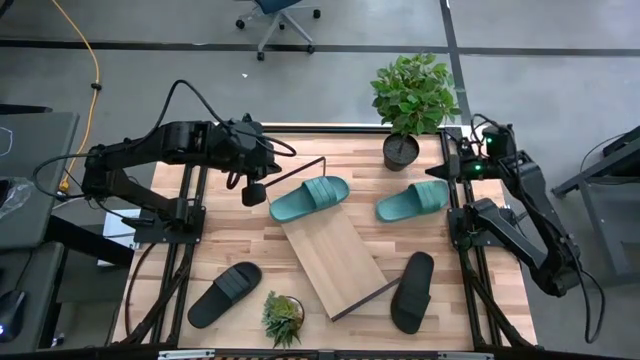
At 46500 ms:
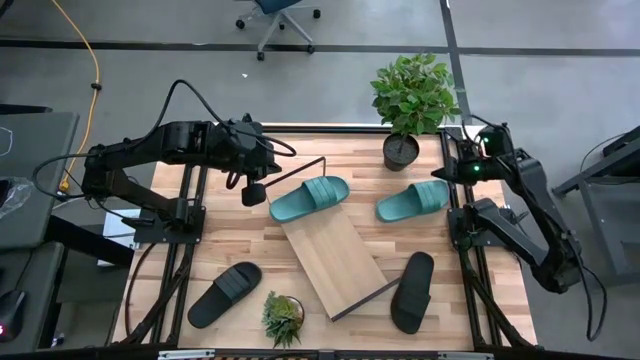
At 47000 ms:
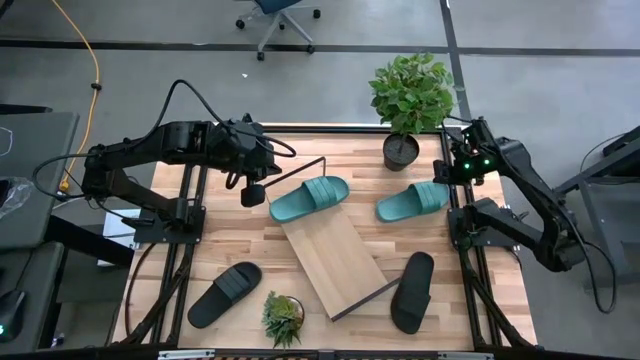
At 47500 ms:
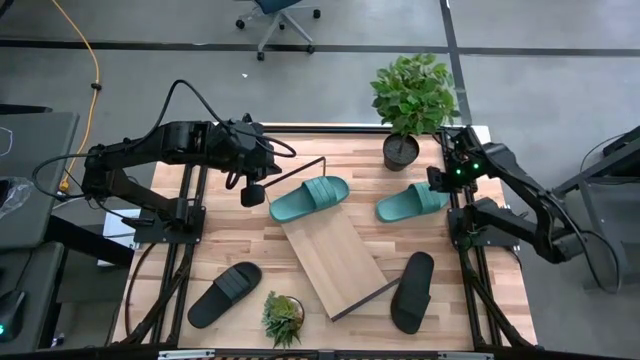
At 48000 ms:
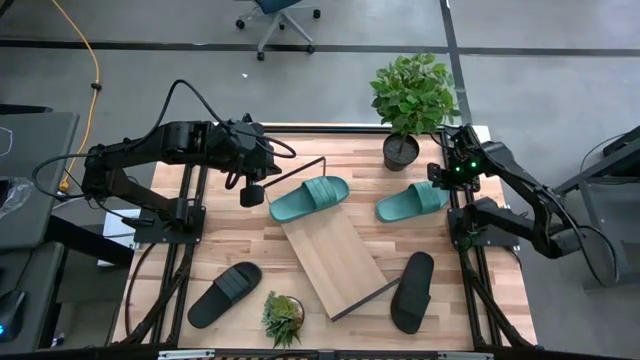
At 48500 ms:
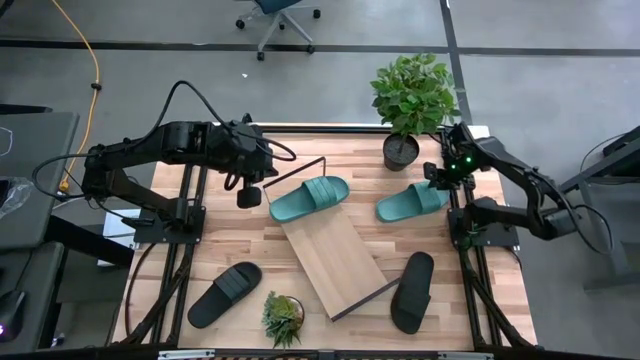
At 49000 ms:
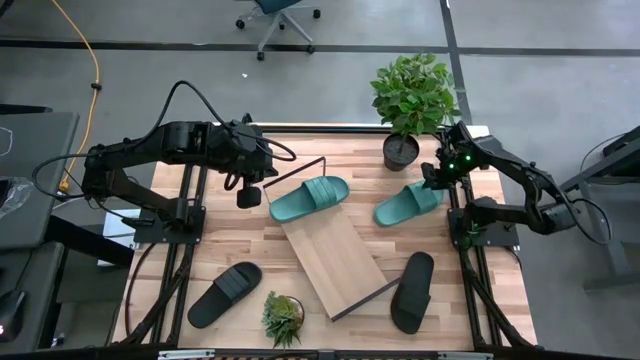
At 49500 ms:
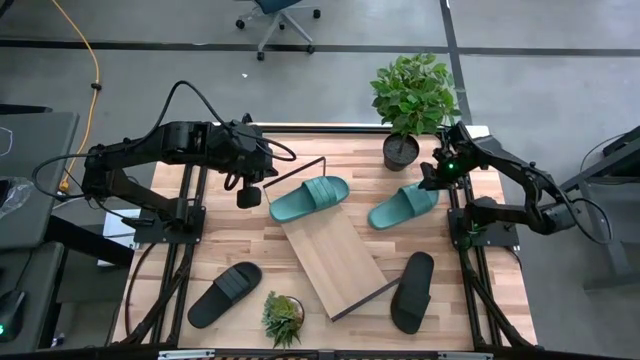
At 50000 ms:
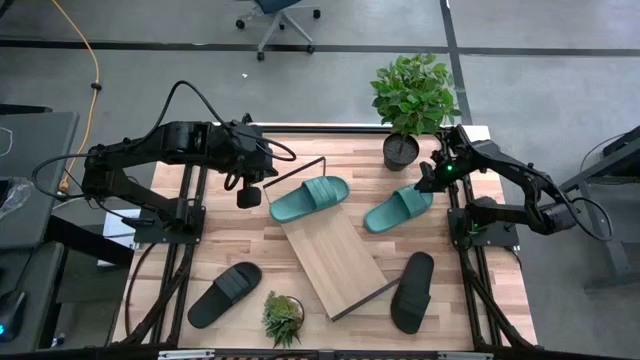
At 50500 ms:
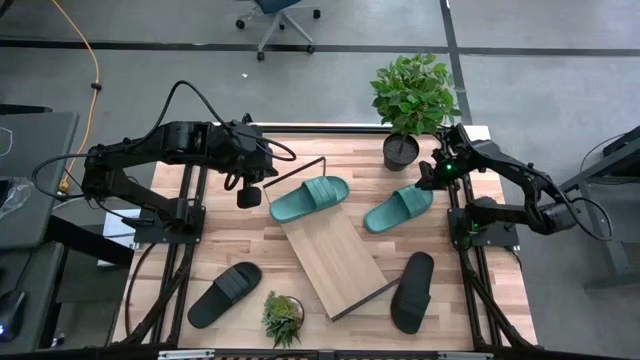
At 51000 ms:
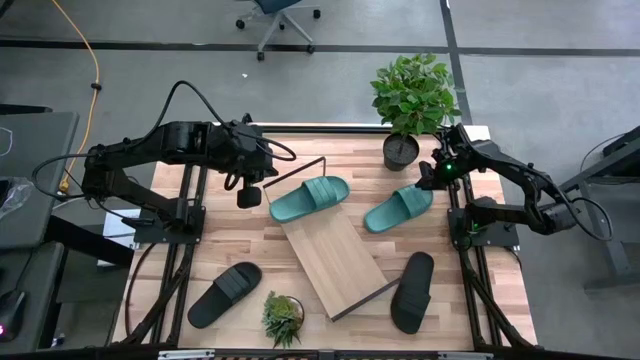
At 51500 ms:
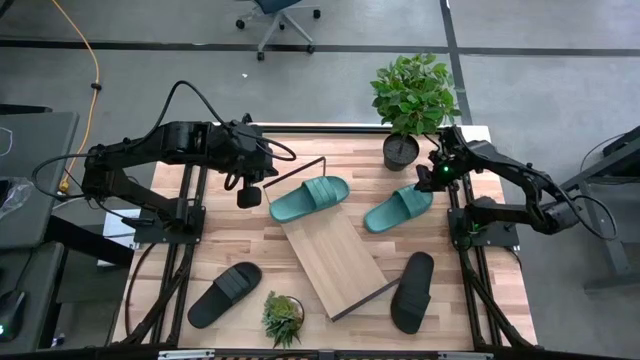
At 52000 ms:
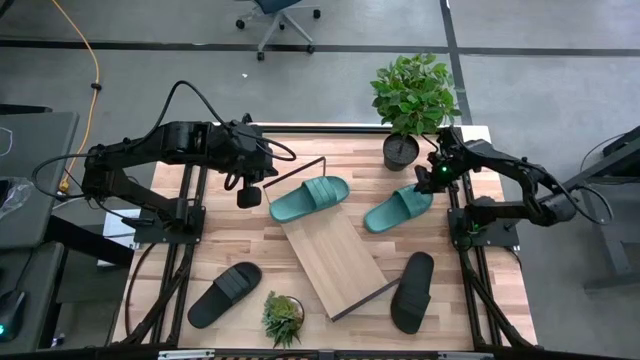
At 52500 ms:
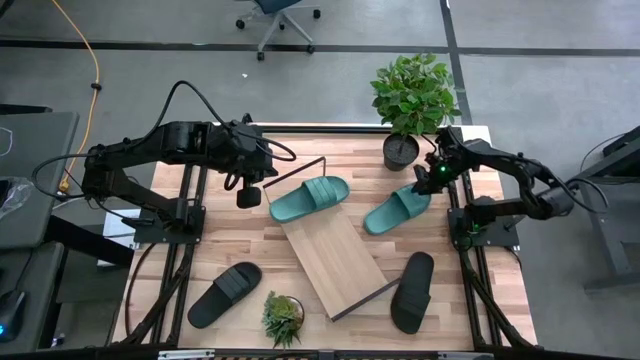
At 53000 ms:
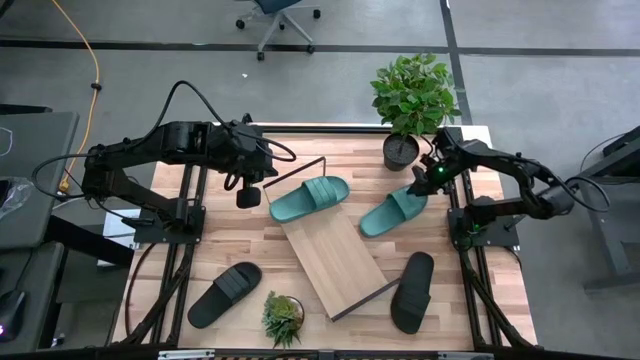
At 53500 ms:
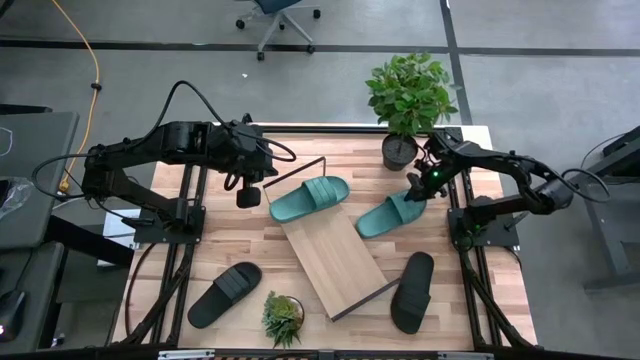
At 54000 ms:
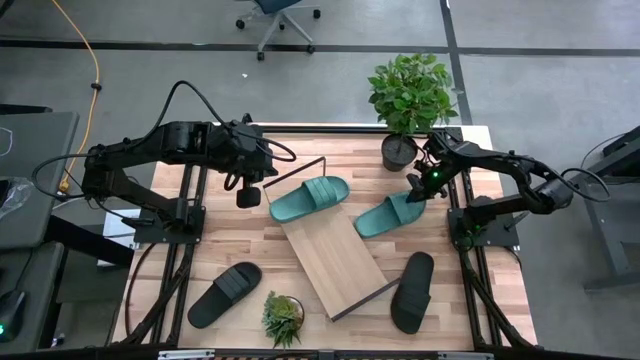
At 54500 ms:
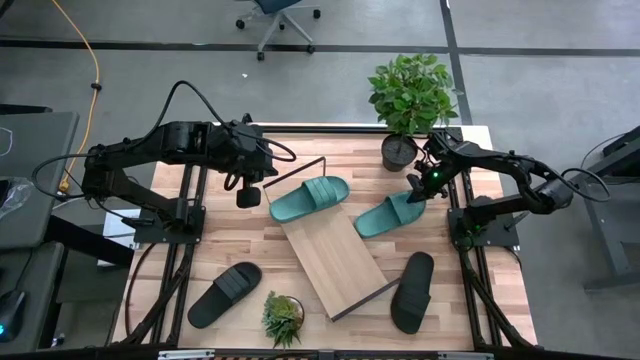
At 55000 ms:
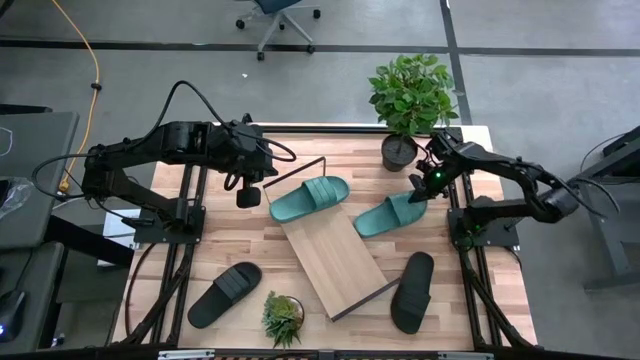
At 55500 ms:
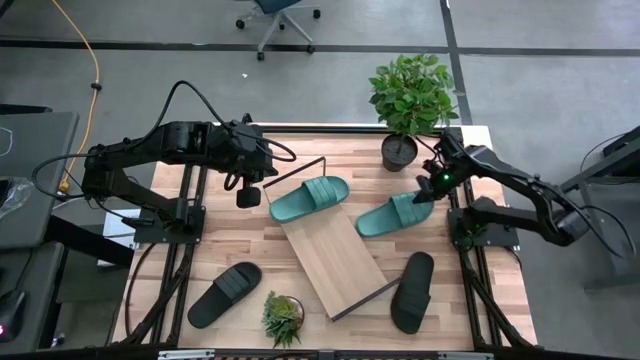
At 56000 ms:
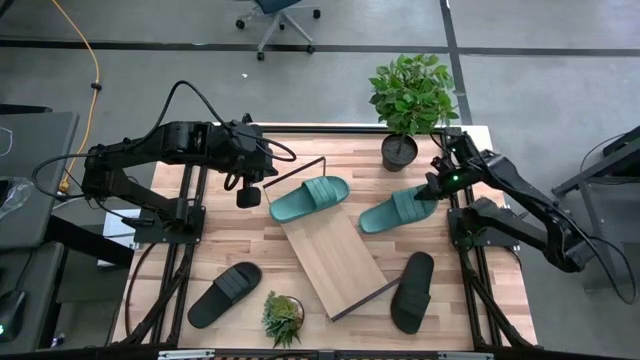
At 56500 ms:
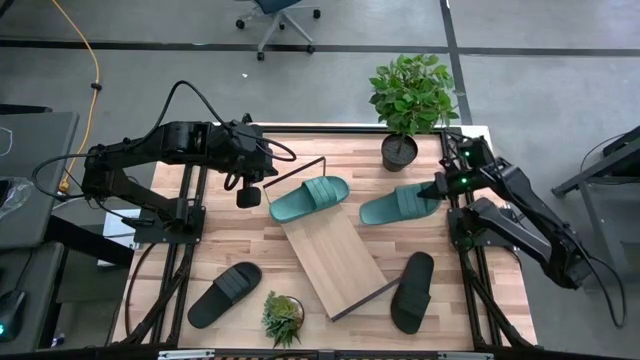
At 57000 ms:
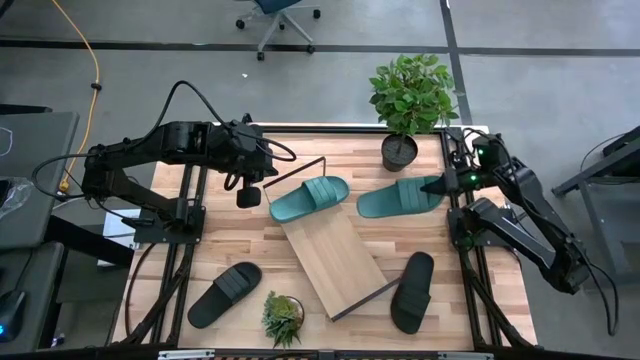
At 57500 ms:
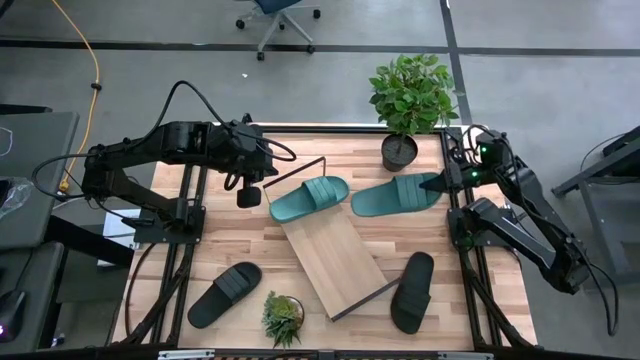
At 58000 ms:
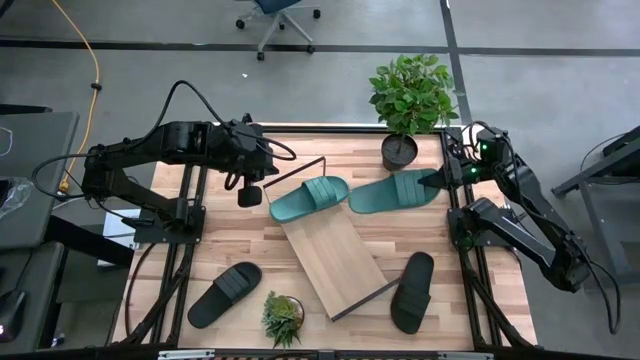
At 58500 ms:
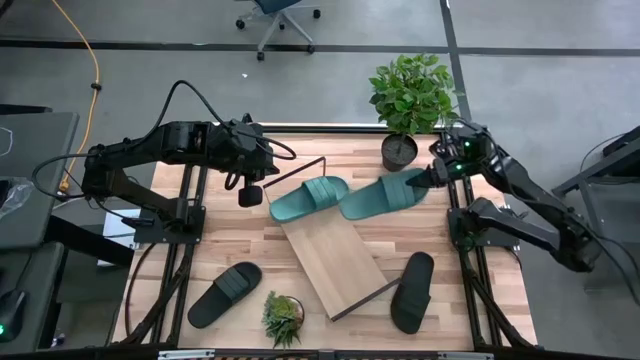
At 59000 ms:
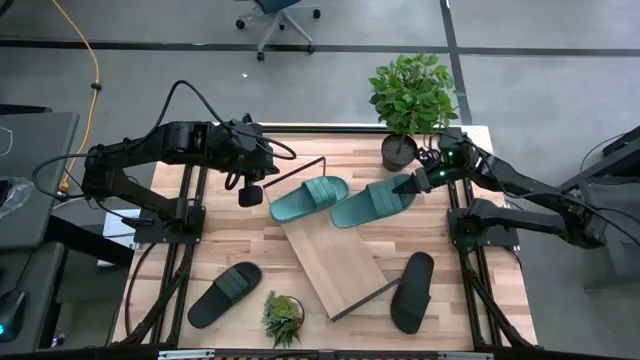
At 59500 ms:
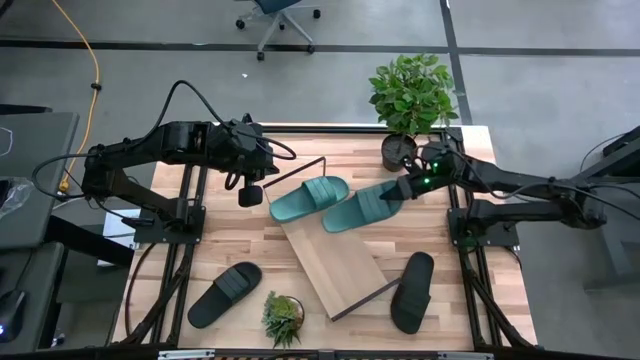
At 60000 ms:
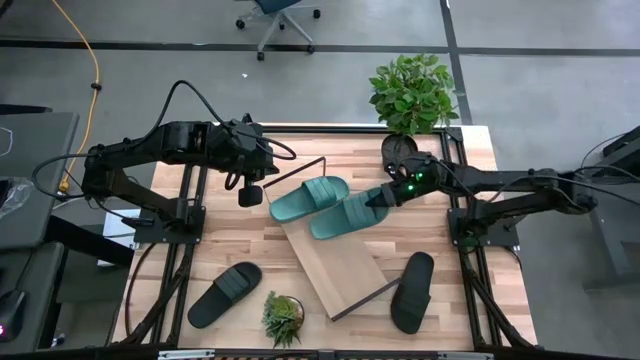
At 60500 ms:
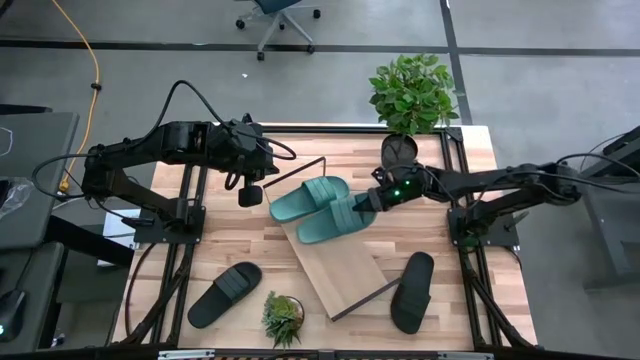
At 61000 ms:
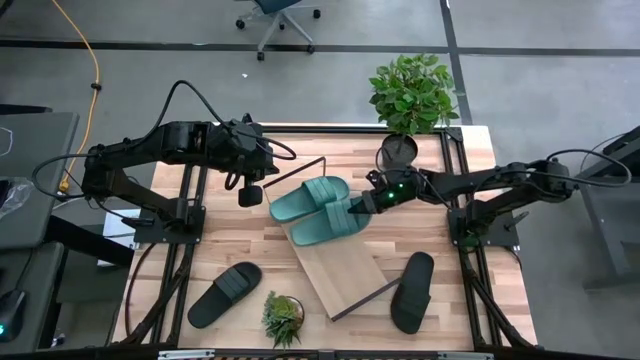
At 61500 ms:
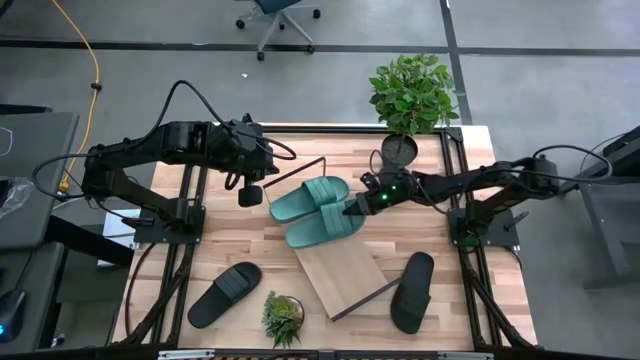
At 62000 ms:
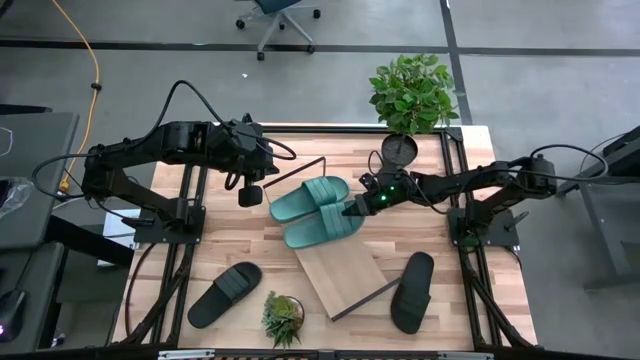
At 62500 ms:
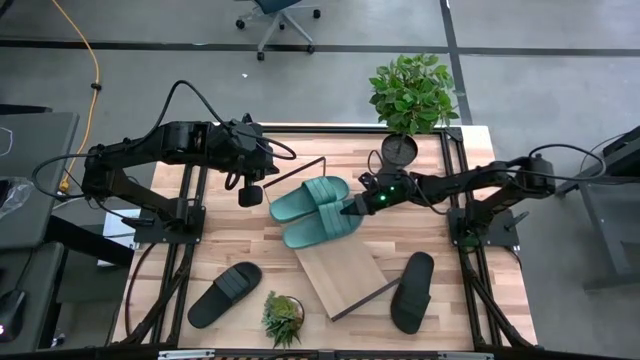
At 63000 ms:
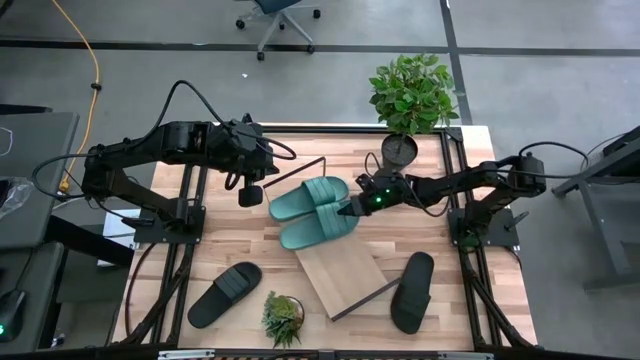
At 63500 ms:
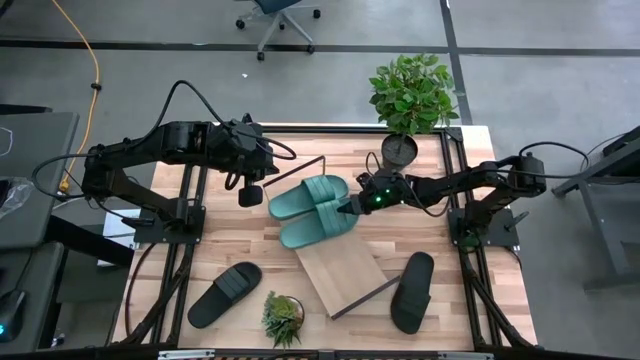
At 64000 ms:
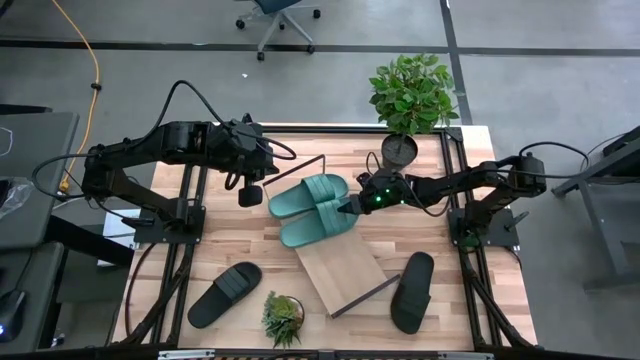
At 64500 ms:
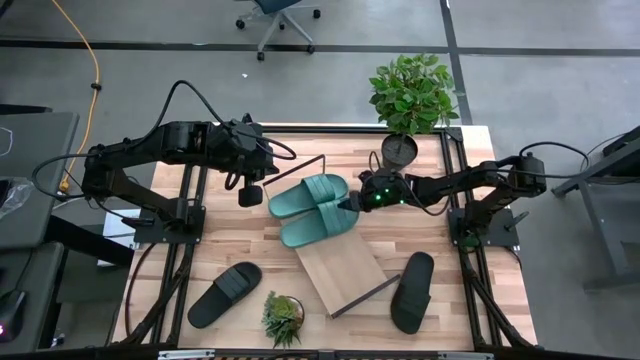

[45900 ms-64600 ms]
Task: Pick and place slides into the shelf
Put the green slide on the shelf
